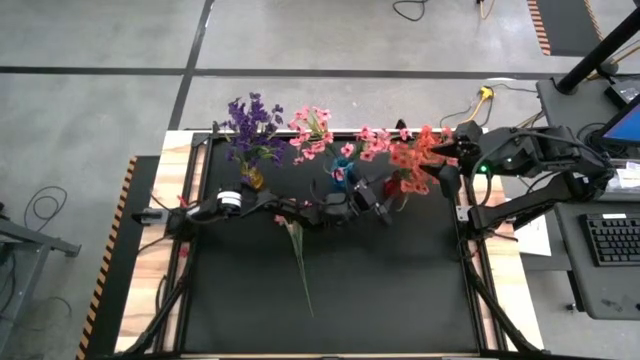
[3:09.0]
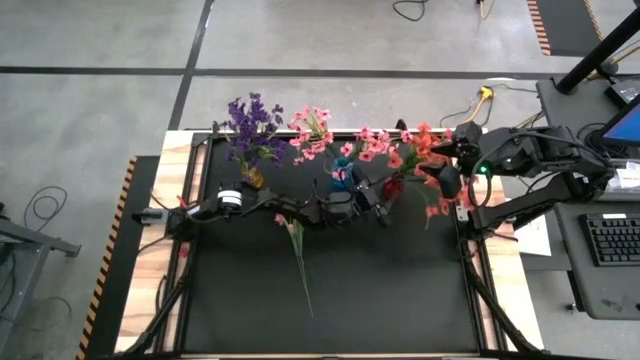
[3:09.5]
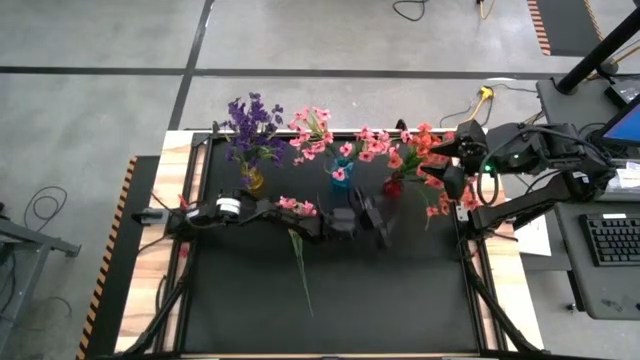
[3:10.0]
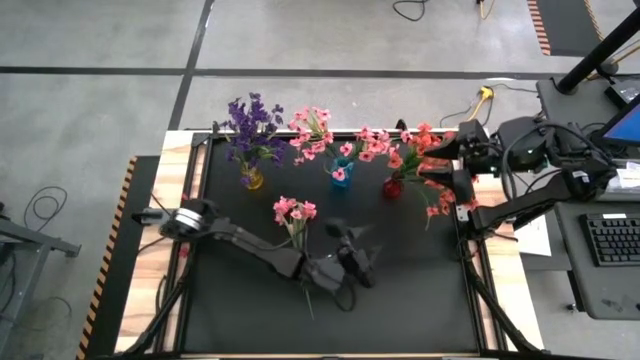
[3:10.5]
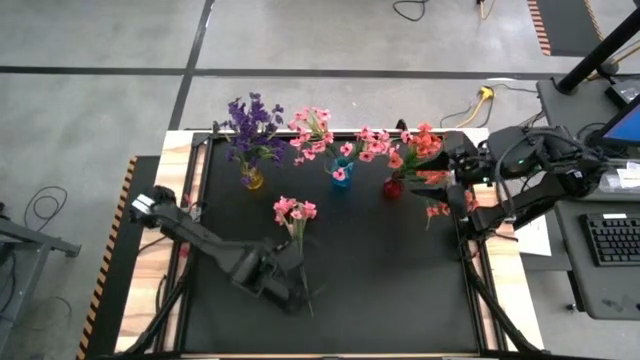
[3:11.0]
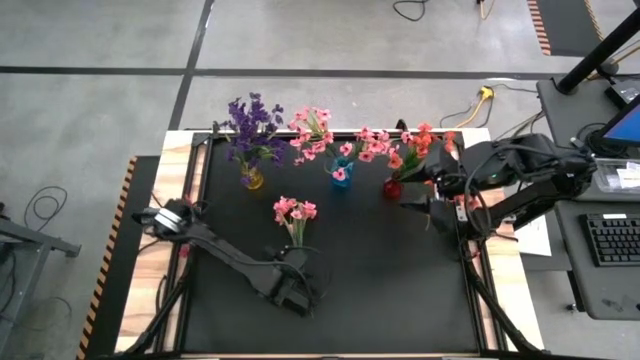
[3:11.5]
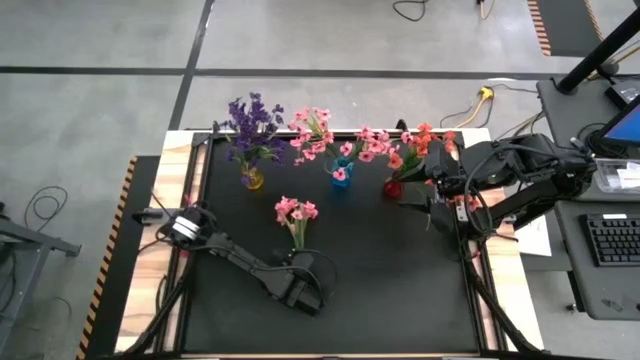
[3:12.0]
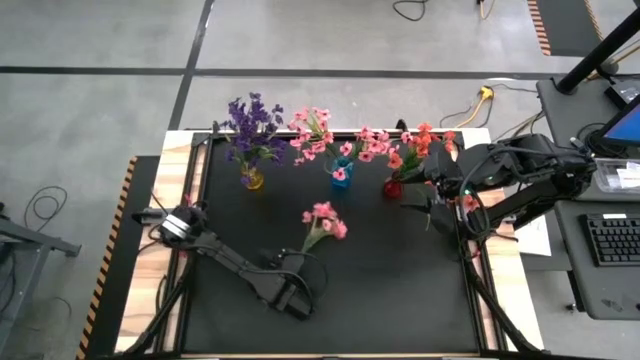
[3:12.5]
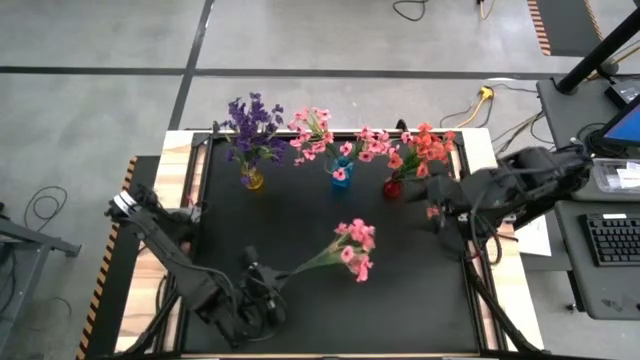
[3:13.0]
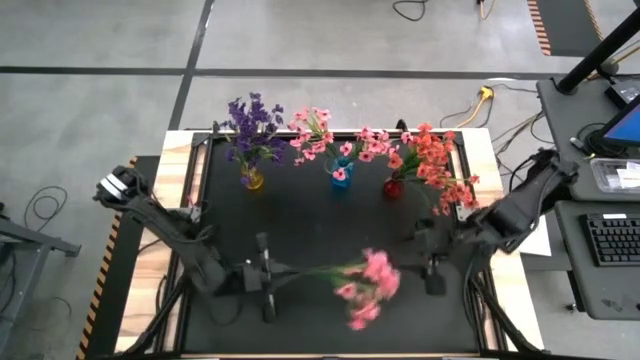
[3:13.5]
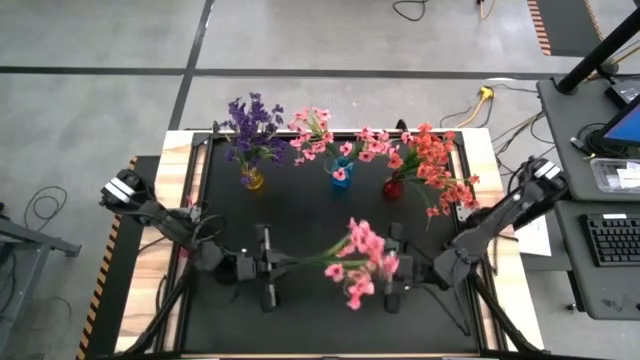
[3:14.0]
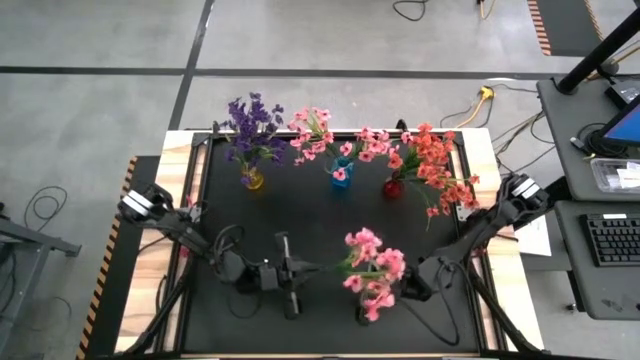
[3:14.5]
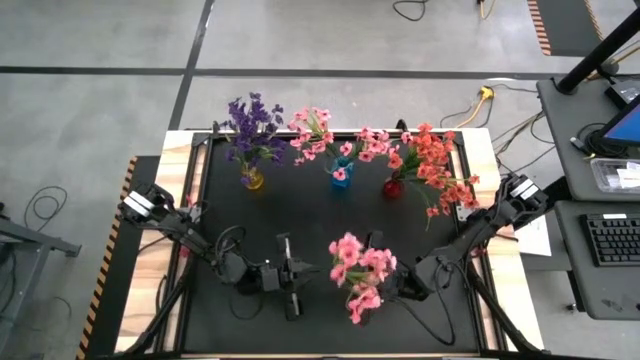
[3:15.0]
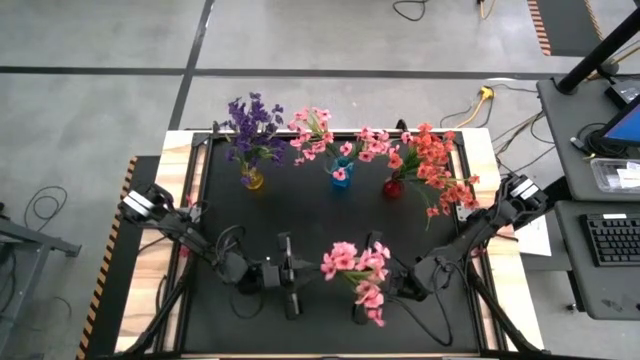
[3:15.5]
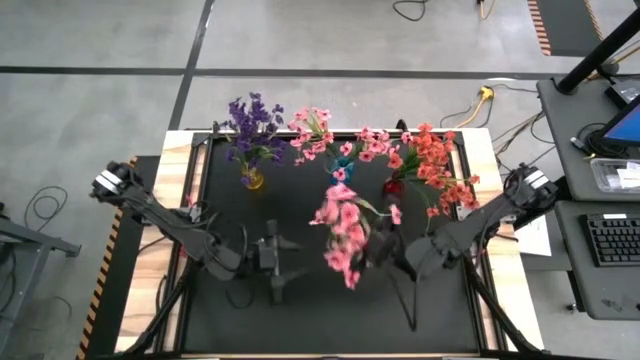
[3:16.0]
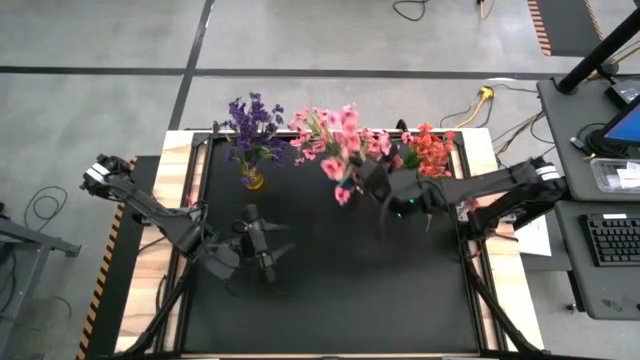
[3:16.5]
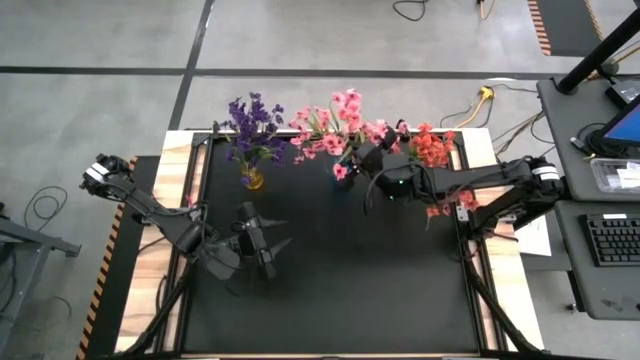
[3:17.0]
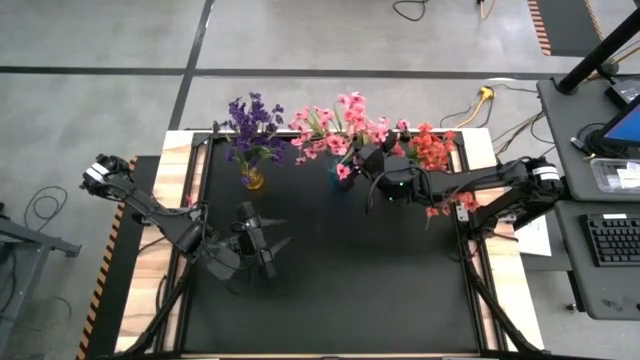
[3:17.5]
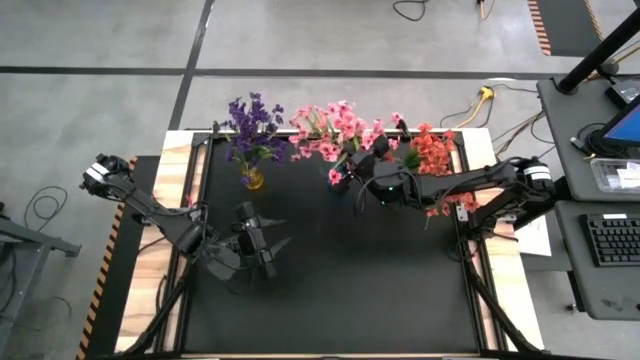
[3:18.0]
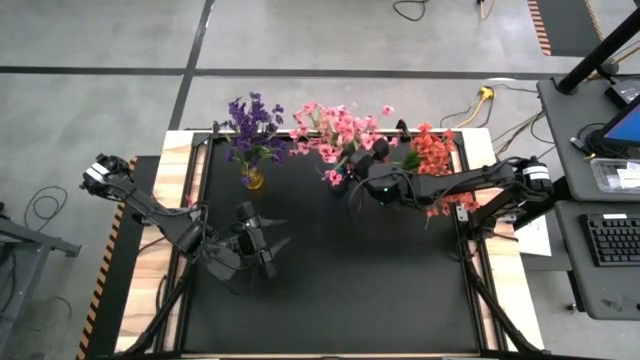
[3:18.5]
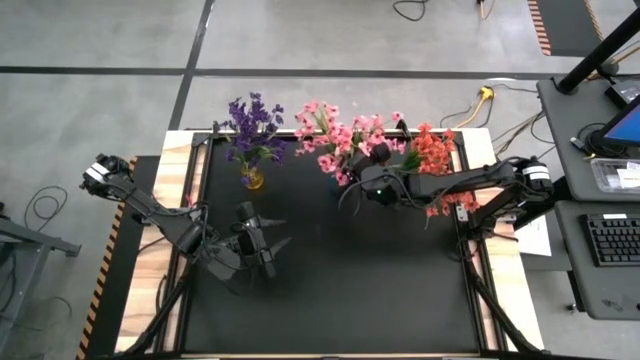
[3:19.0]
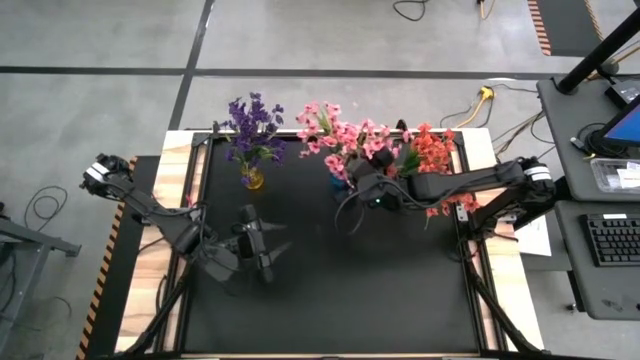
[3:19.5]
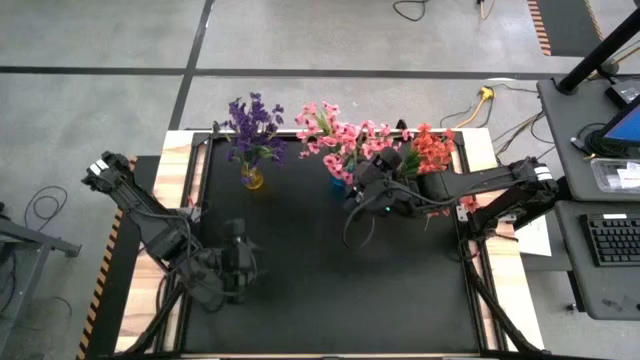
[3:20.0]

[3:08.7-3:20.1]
Task: Sort flowers into vase by color
Put the pink flower into the blue vase

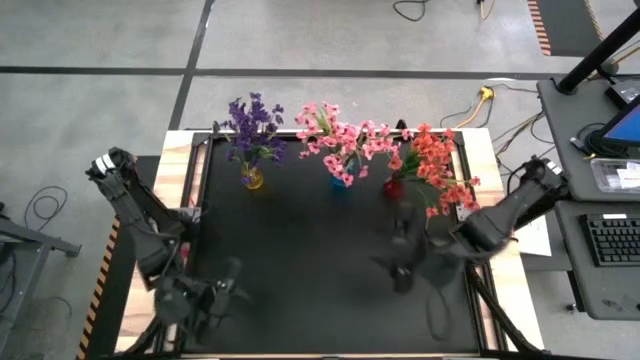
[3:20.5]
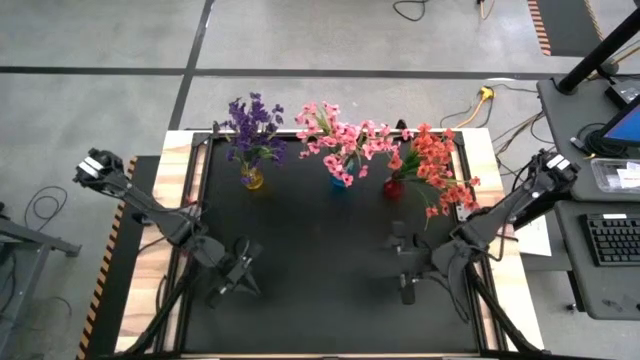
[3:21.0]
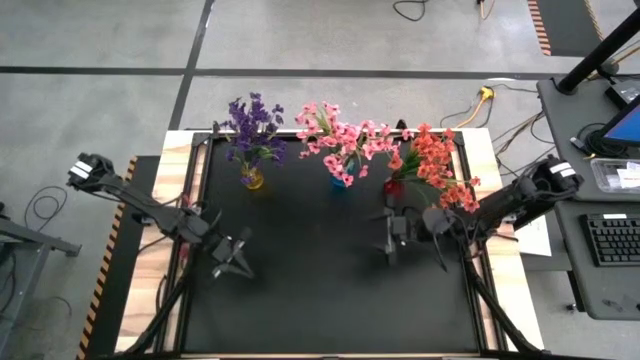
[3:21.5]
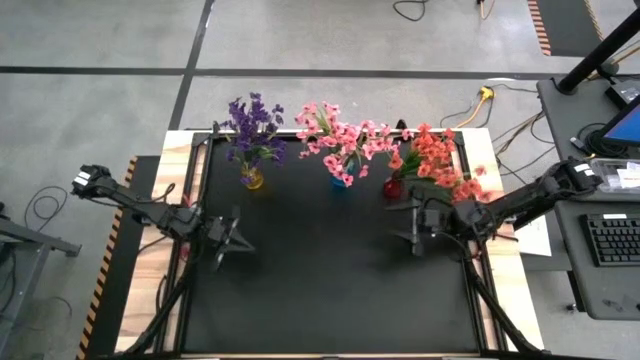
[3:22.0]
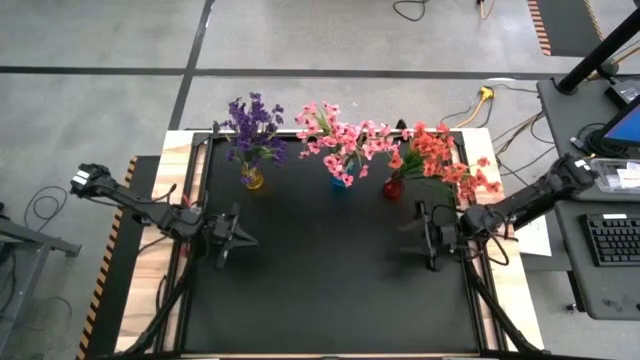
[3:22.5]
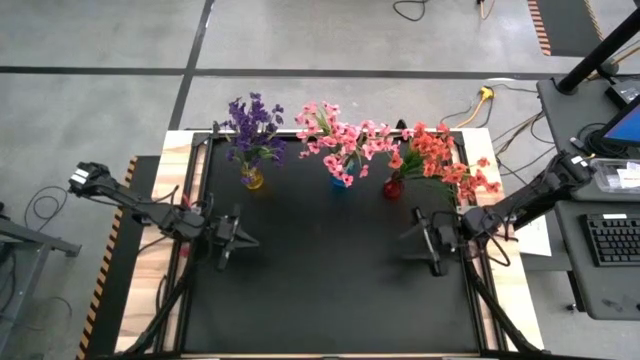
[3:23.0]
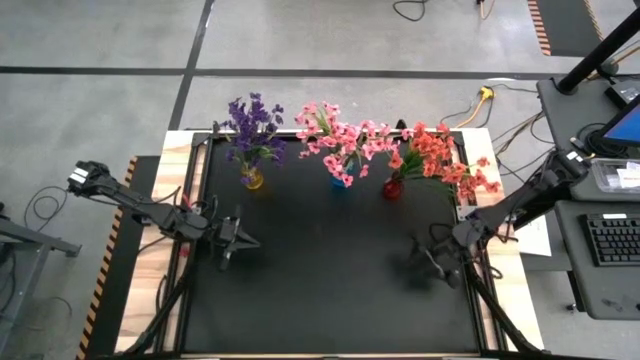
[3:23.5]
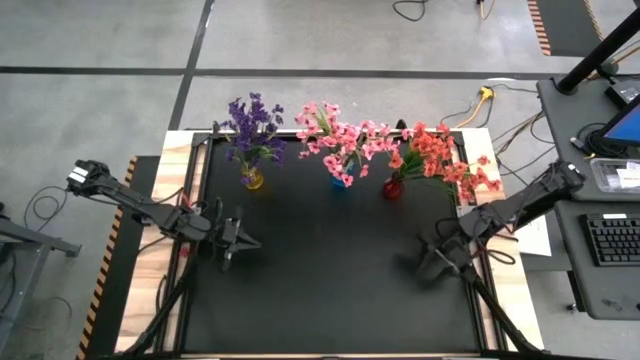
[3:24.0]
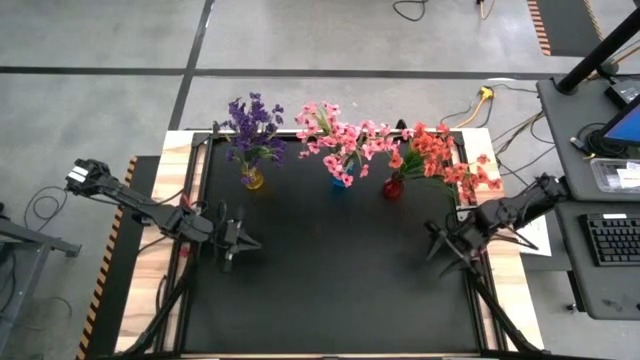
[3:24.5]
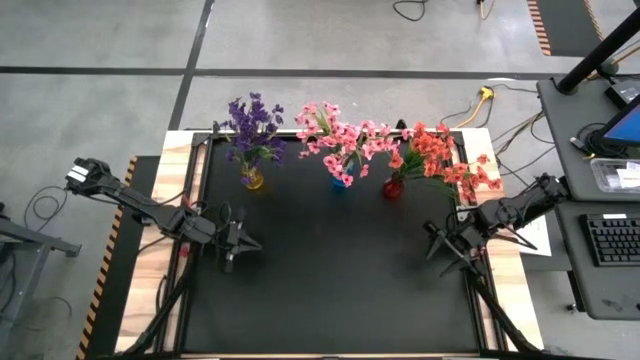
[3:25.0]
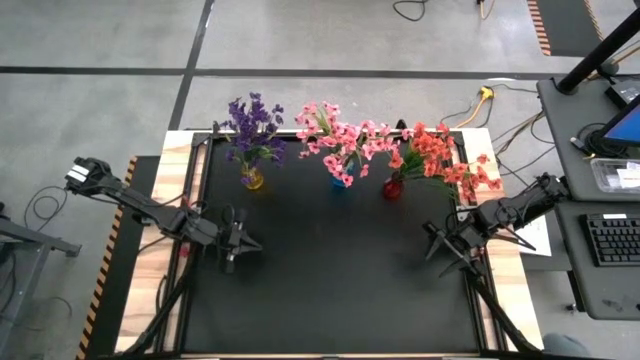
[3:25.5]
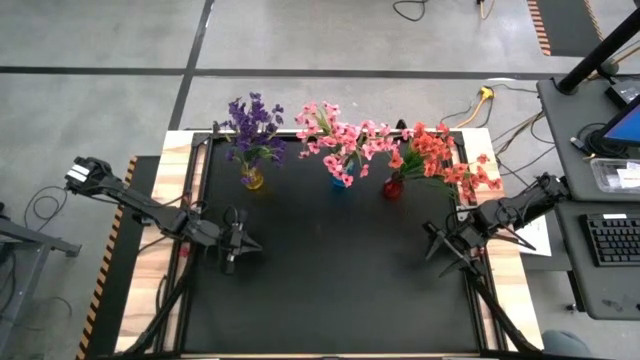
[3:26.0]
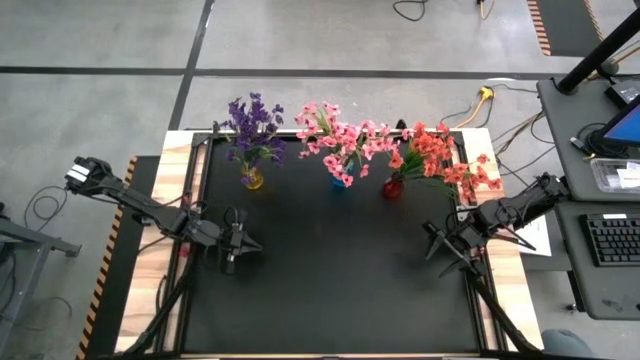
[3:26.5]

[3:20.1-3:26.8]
Return to Home Position

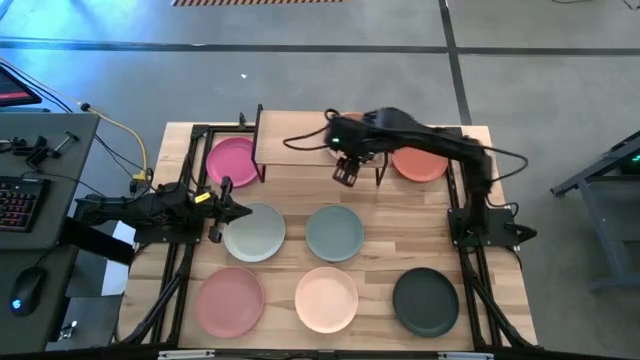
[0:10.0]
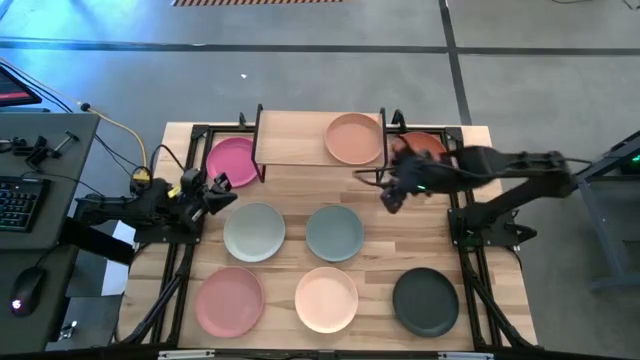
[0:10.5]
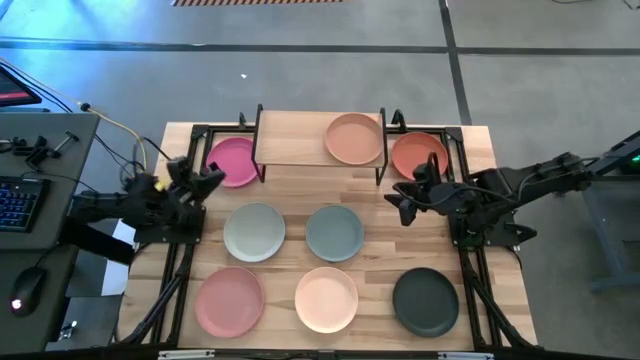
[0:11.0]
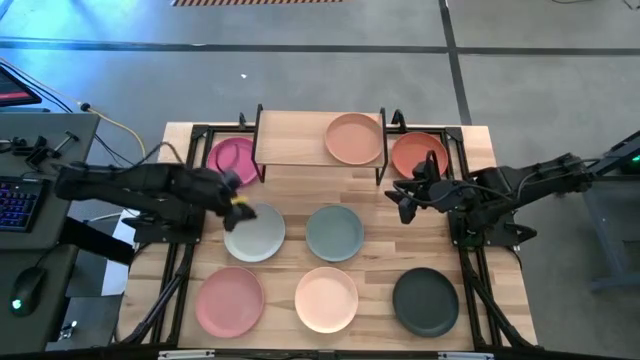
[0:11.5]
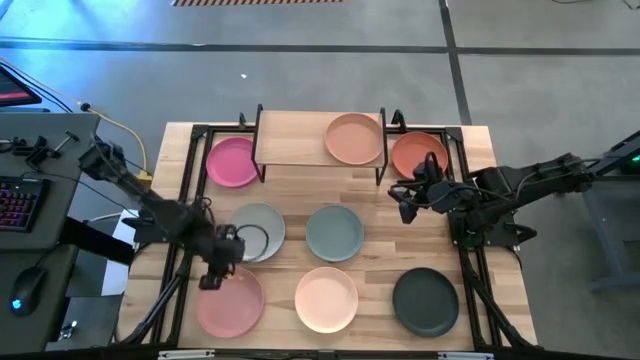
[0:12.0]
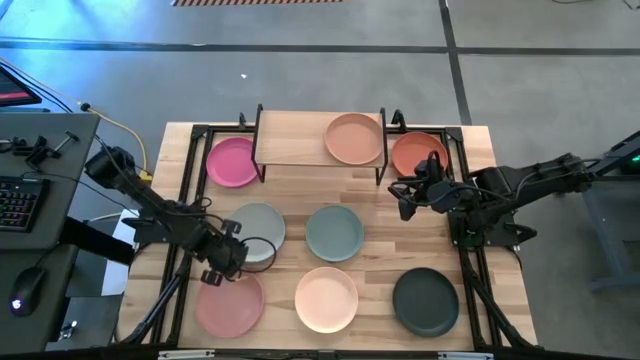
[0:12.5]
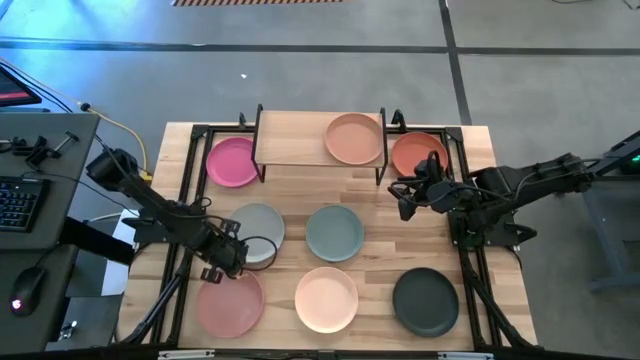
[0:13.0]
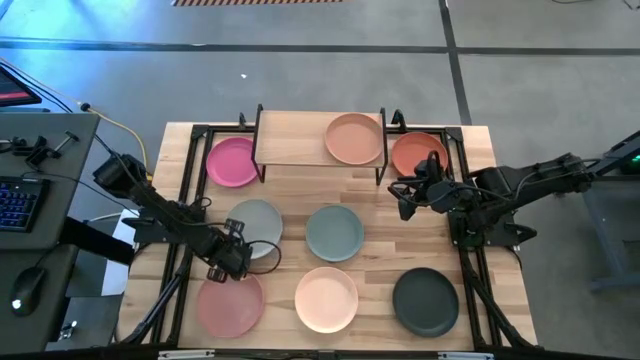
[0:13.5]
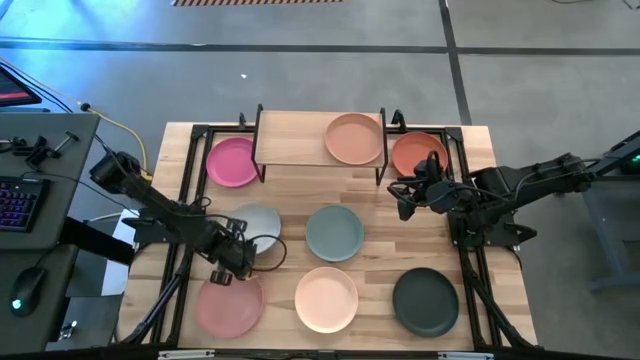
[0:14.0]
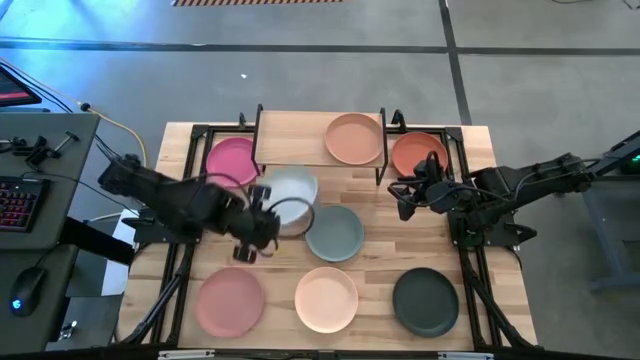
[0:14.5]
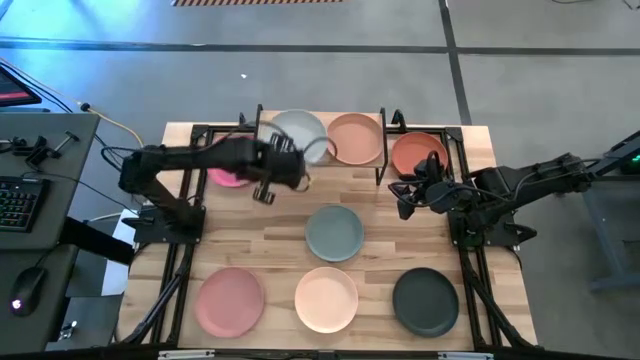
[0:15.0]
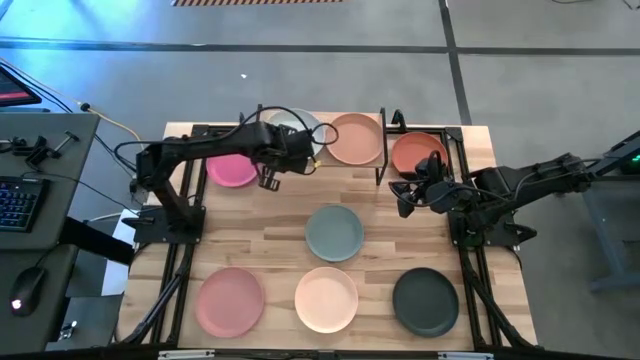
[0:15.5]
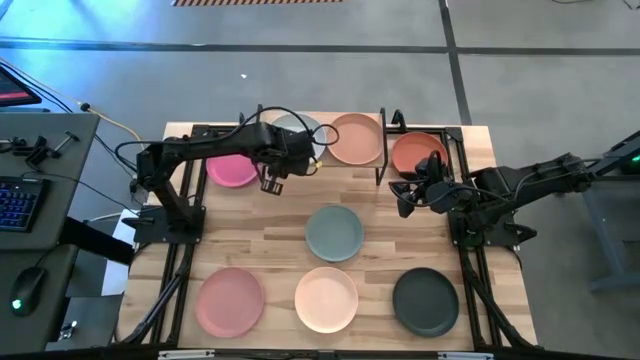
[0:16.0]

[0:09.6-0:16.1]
Task: Place and stack plates onto a shelf
Put the white plate on the shelf
